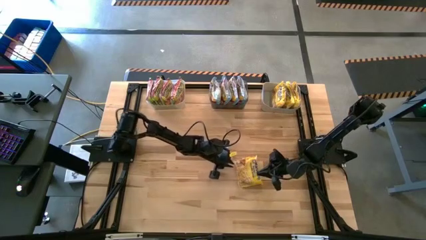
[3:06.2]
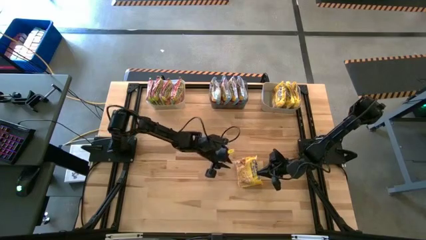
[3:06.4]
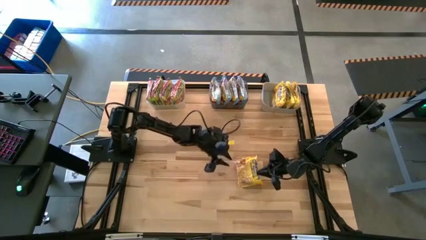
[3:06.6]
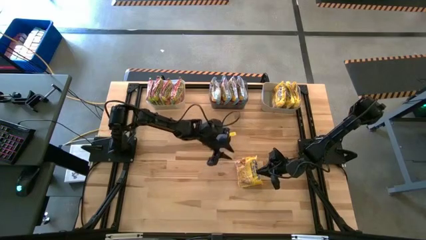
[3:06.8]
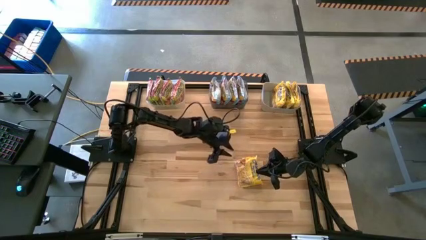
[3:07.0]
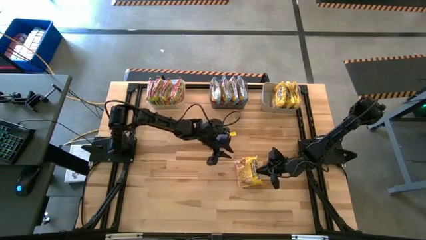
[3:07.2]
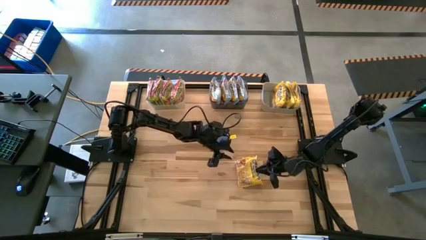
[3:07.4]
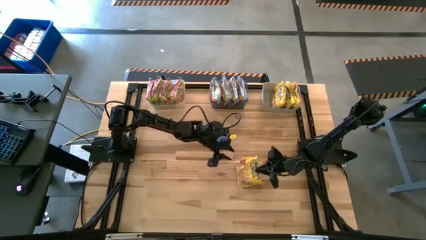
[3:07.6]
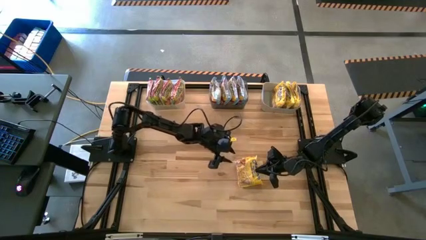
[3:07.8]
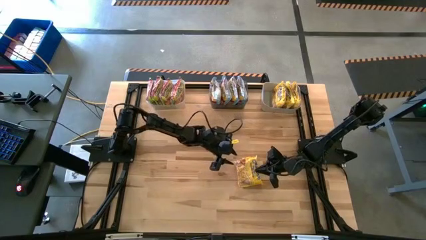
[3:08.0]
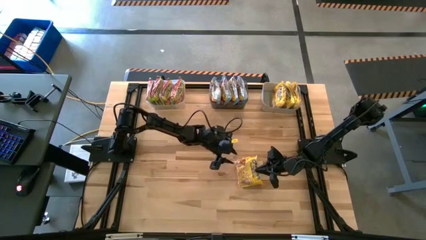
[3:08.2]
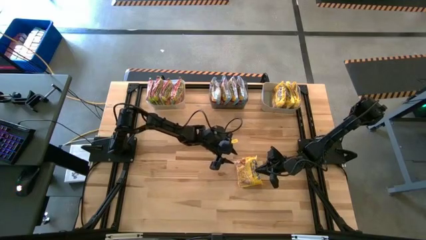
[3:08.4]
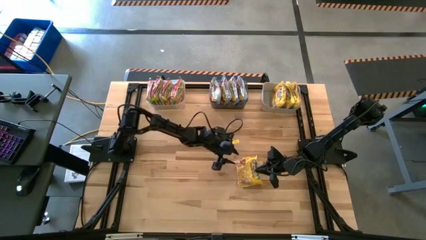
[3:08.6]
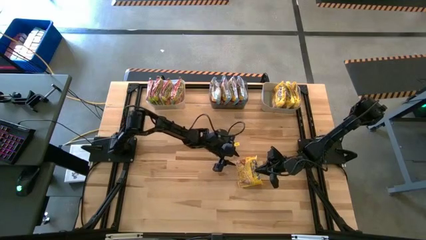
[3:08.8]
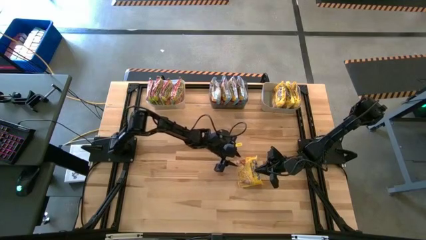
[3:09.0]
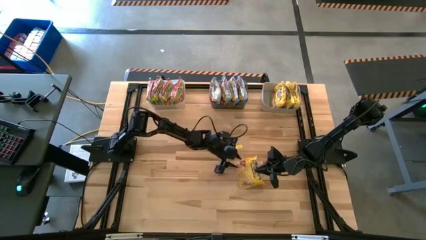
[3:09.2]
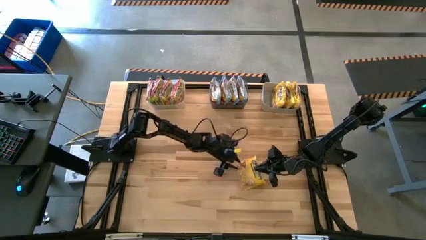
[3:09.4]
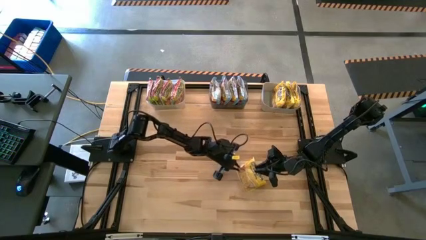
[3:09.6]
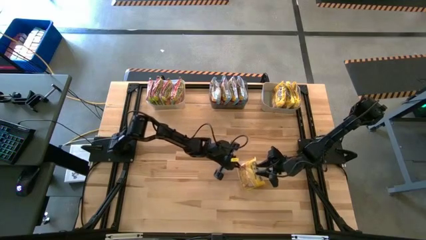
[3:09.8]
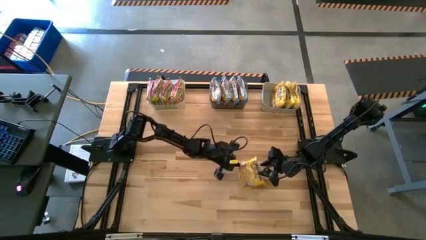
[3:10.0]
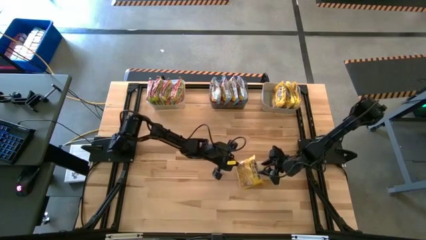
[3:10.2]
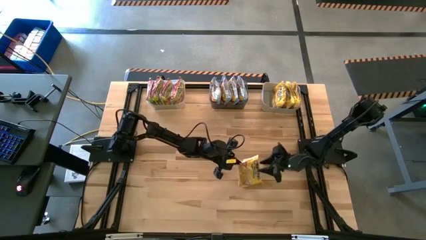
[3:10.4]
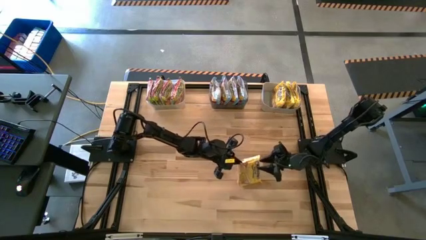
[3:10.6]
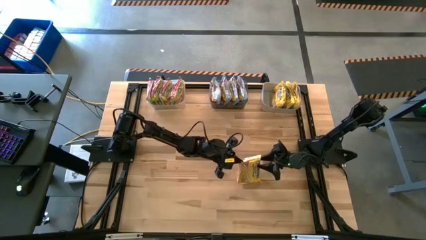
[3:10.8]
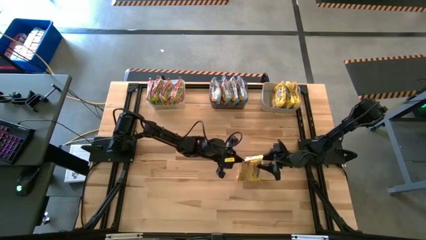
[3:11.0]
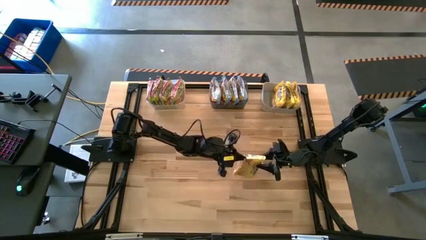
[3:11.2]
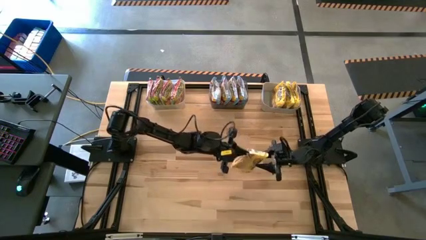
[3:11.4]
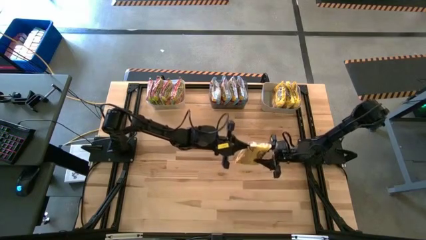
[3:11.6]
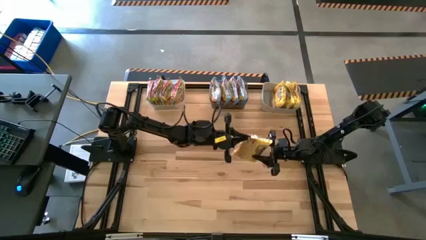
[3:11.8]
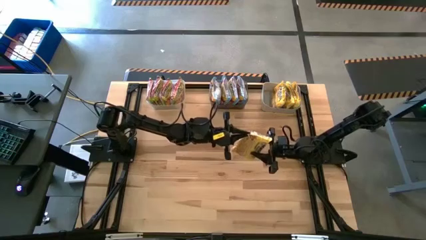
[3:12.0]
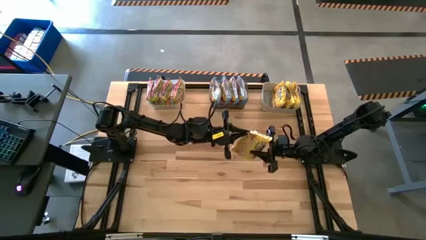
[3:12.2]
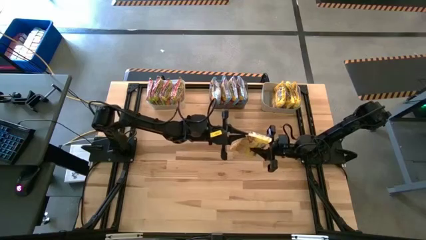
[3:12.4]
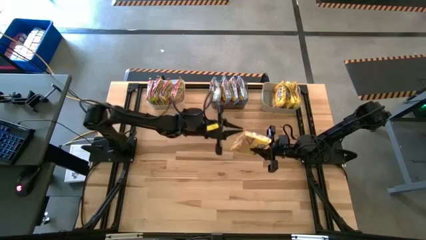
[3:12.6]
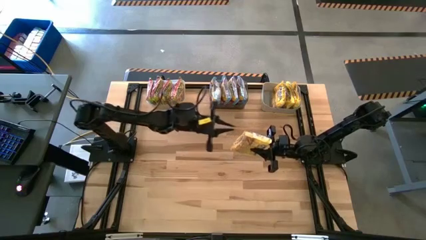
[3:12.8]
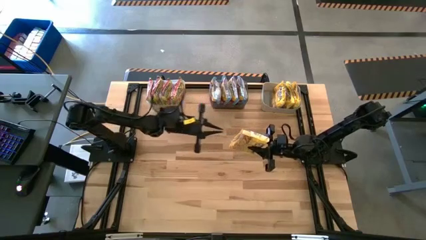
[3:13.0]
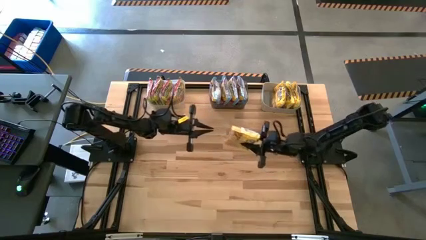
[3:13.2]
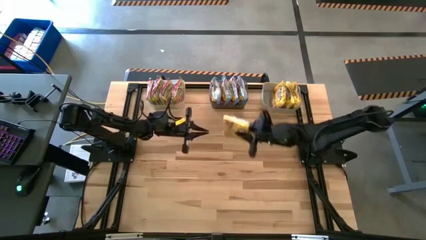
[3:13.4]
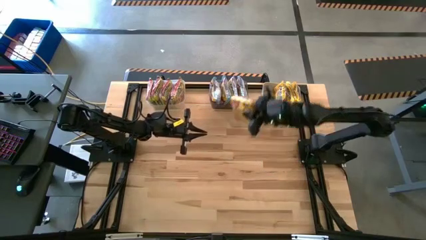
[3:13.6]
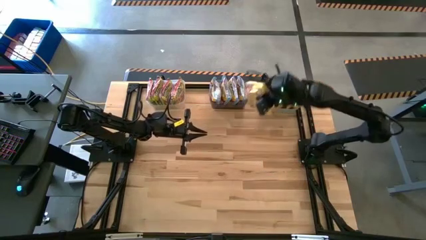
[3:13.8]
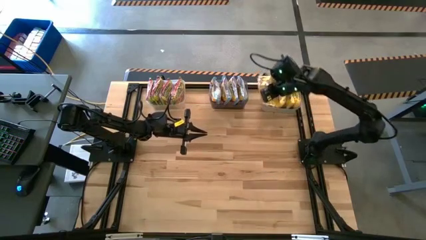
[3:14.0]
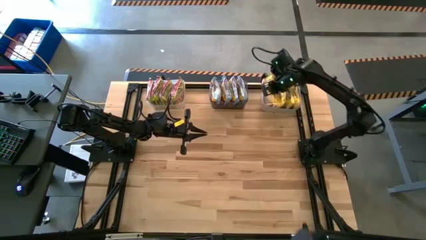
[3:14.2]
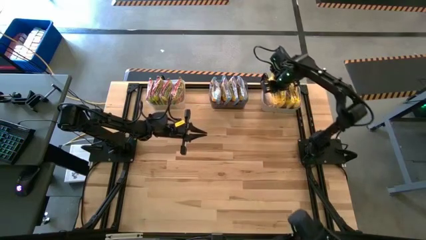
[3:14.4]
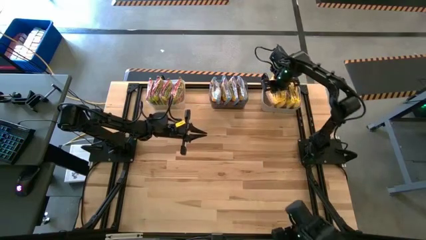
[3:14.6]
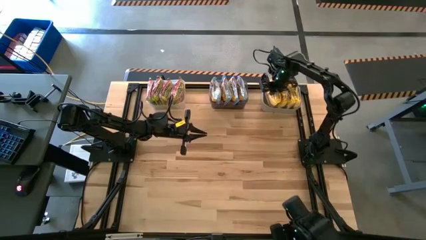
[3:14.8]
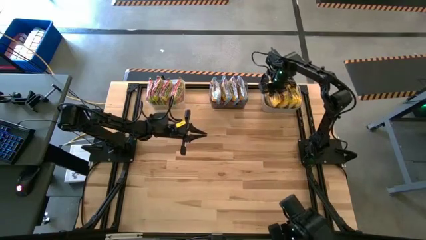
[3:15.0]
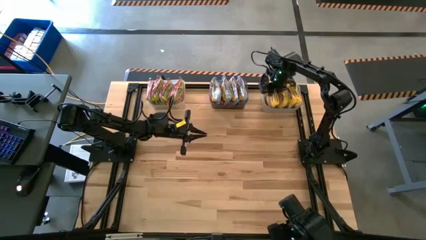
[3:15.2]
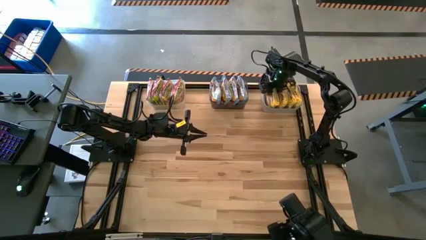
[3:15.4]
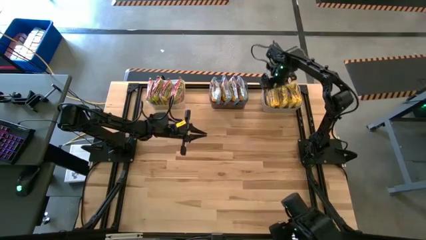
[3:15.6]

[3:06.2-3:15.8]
Task: Sort Maruchan noodles
Put the yellow noodle pack into the gray bin

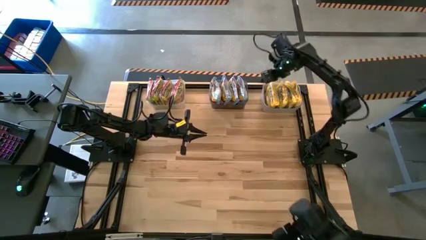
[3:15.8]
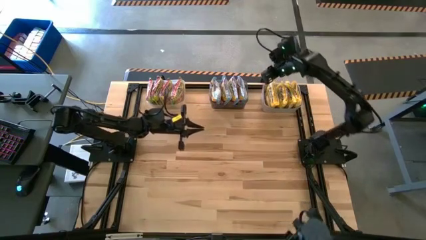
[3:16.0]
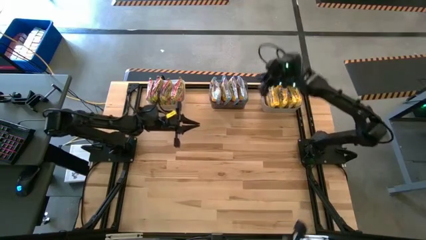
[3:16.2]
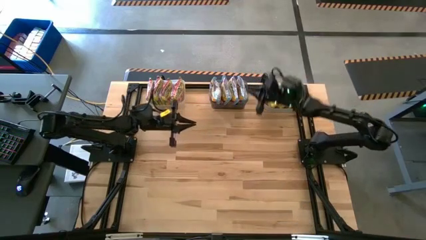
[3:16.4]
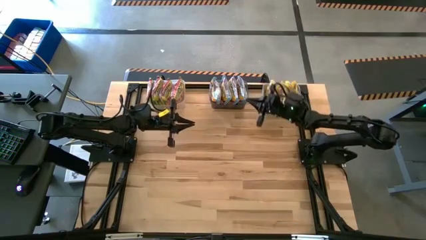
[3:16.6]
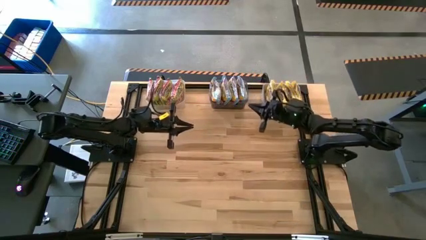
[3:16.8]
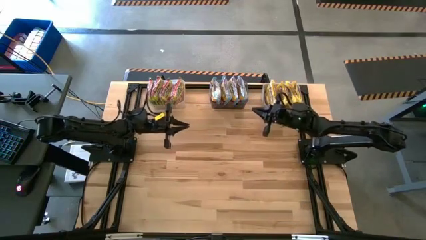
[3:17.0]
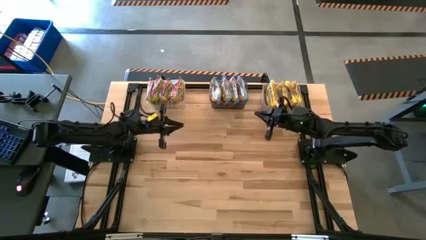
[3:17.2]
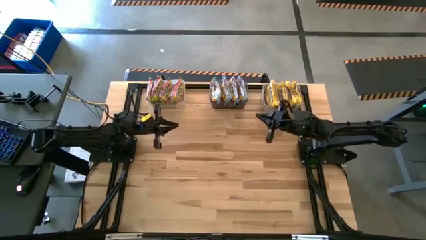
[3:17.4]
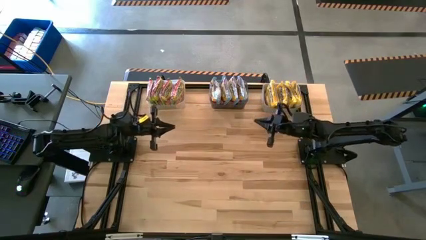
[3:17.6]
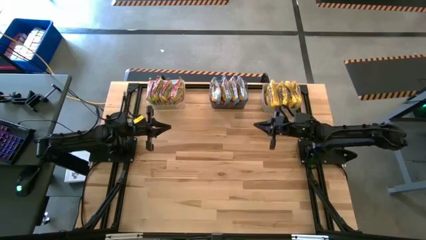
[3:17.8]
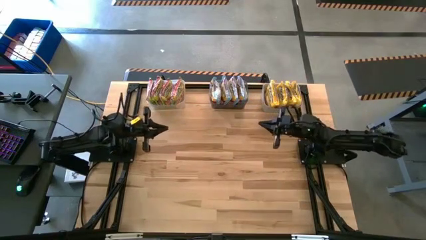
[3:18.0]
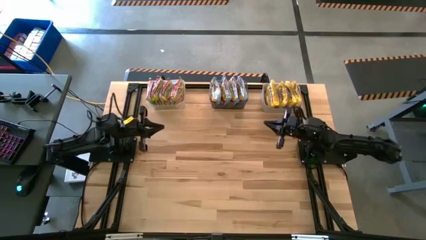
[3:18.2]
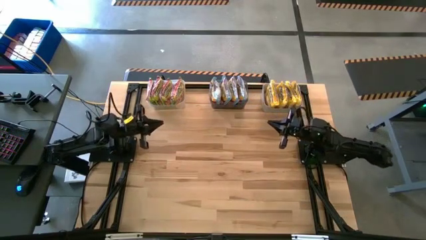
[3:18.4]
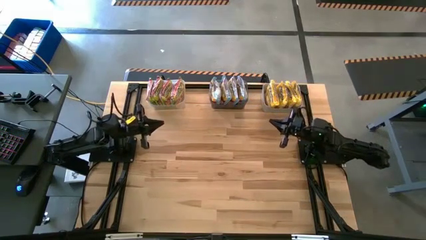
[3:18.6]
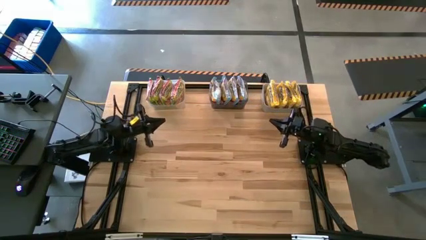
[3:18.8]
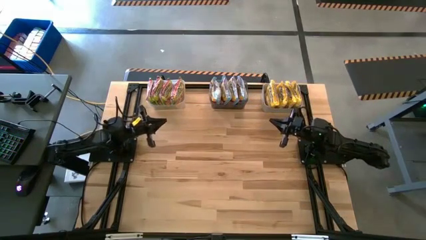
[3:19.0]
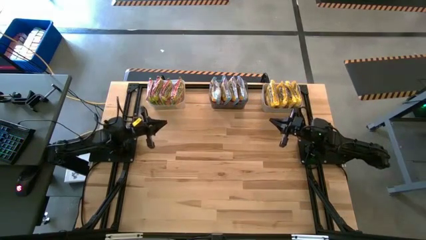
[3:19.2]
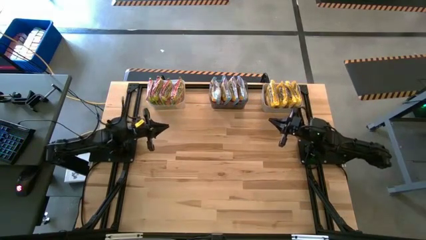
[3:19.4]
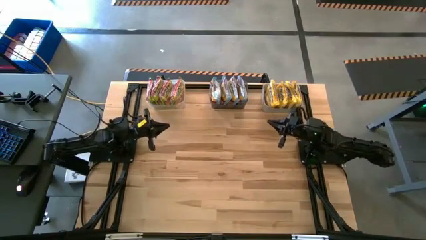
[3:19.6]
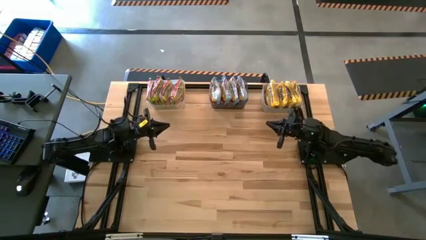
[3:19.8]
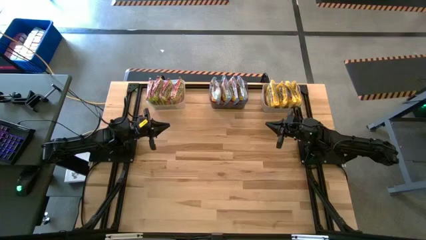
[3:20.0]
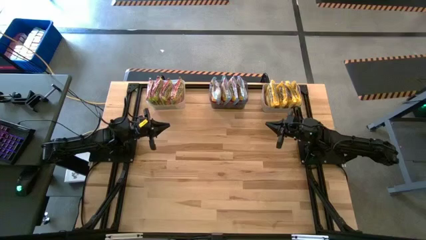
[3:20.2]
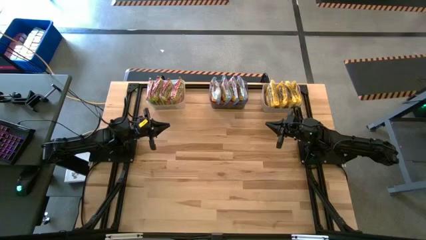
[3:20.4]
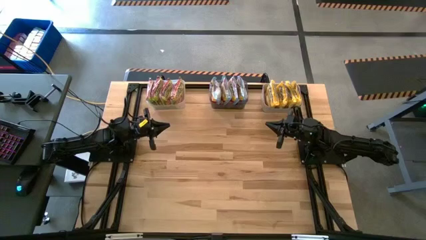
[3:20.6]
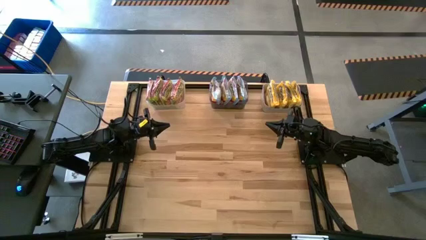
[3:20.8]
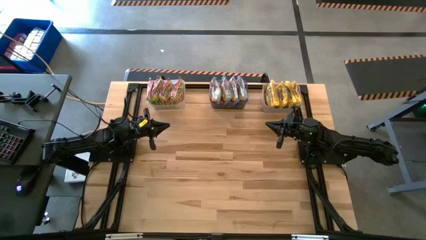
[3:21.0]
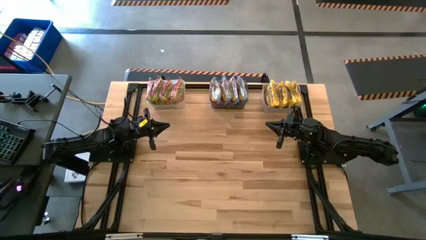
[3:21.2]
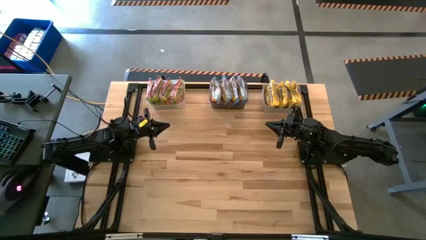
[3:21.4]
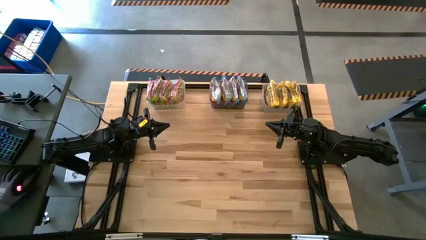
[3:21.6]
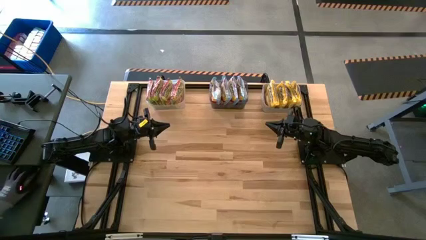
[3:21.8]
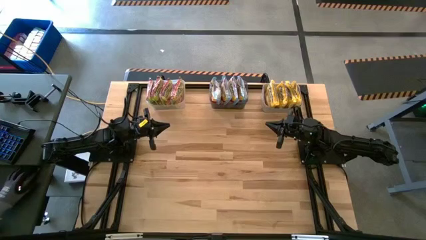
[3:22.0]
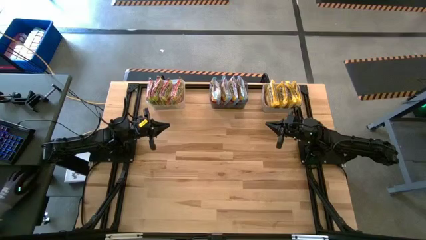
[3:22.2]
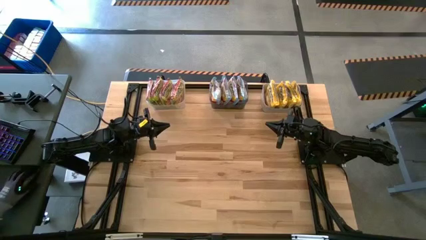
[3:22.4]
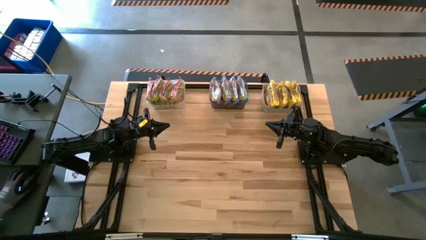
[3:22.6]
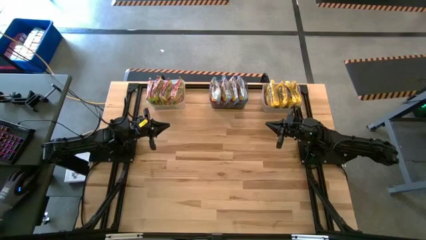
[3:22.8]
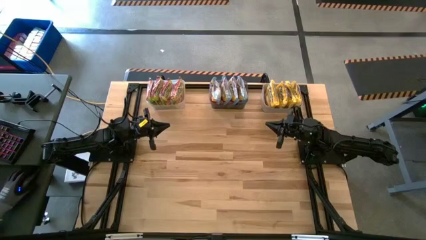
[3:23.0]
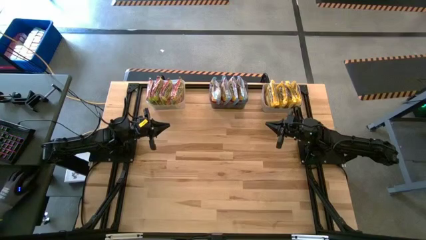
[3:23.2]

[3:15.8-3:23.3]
Return to Home Position
